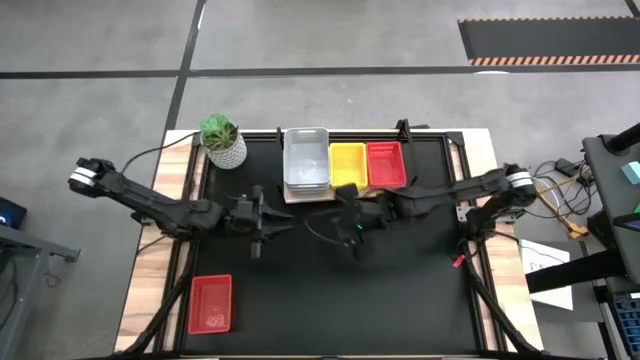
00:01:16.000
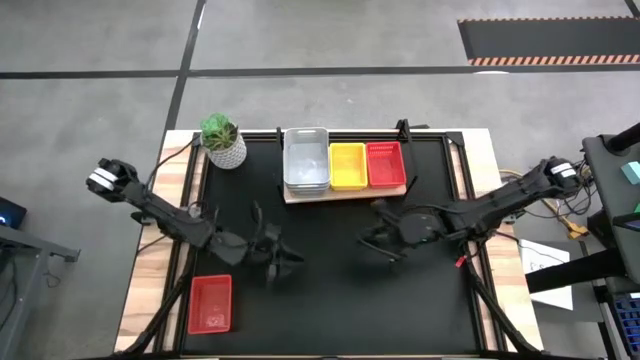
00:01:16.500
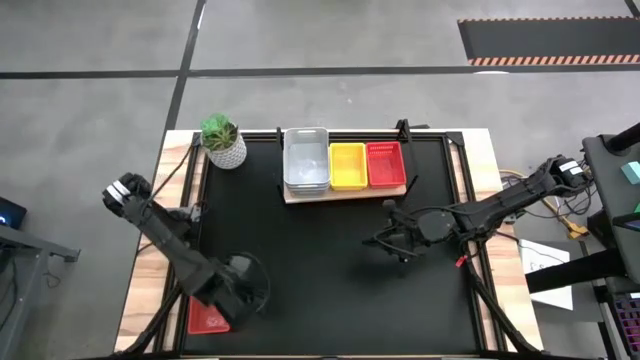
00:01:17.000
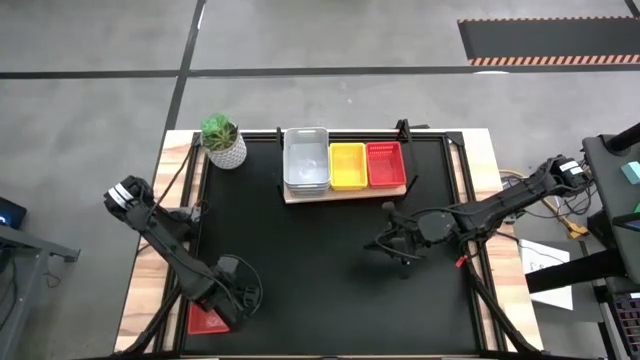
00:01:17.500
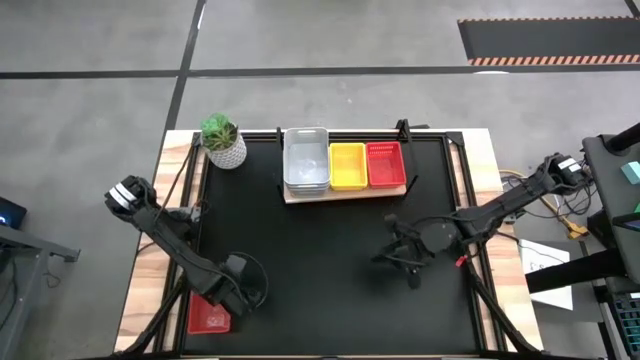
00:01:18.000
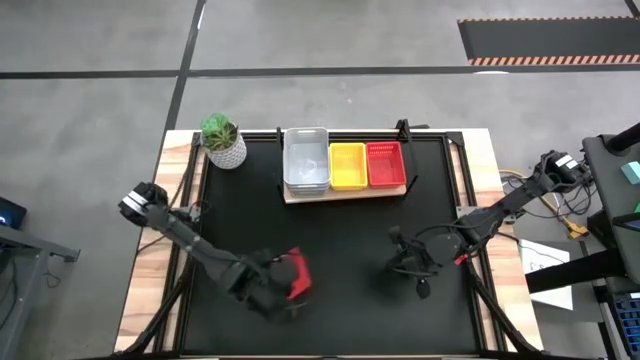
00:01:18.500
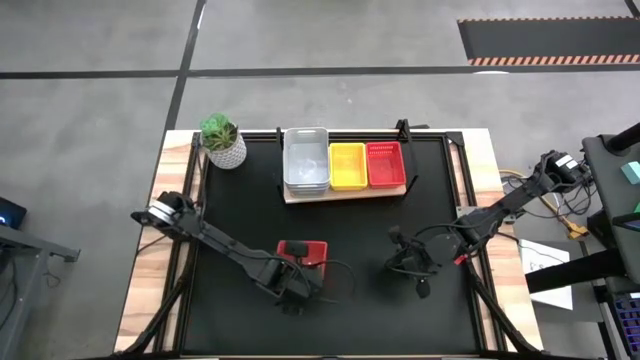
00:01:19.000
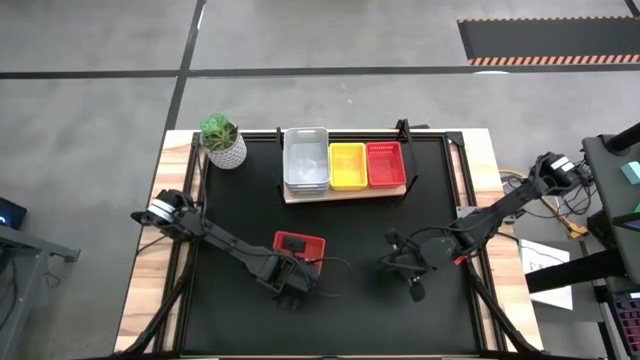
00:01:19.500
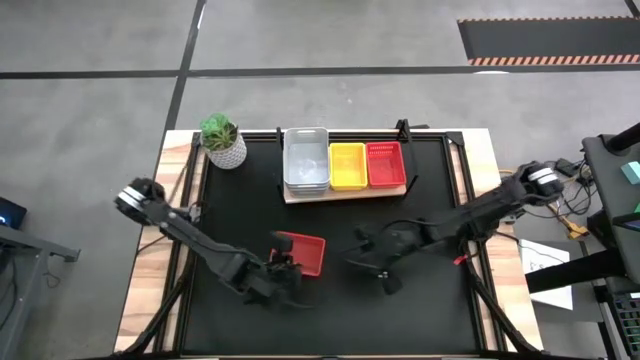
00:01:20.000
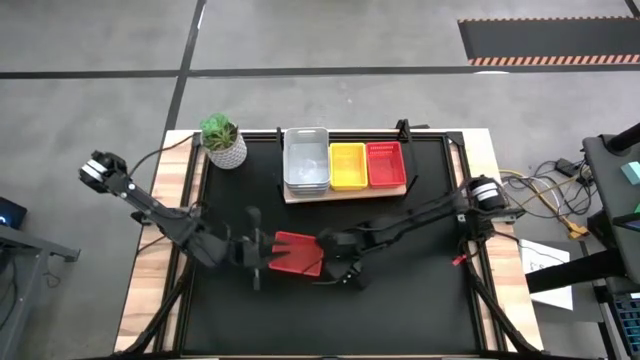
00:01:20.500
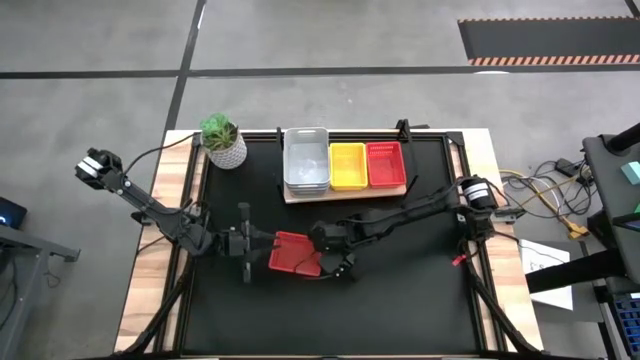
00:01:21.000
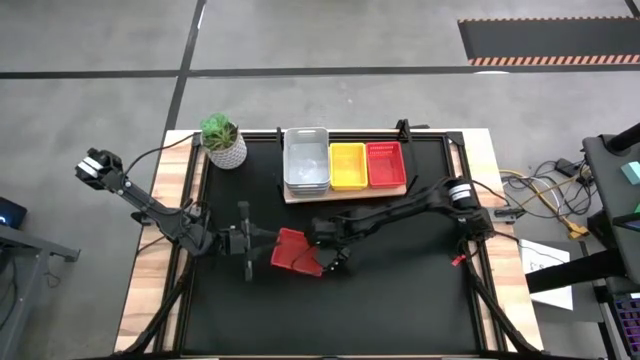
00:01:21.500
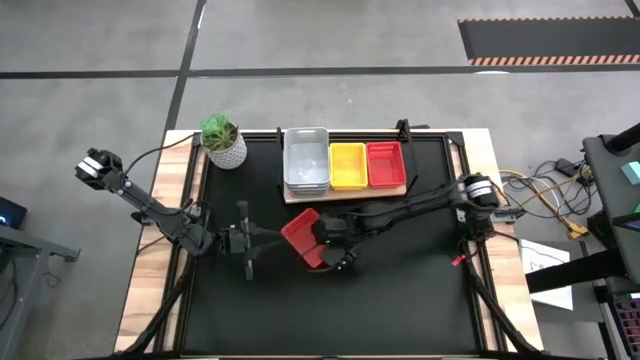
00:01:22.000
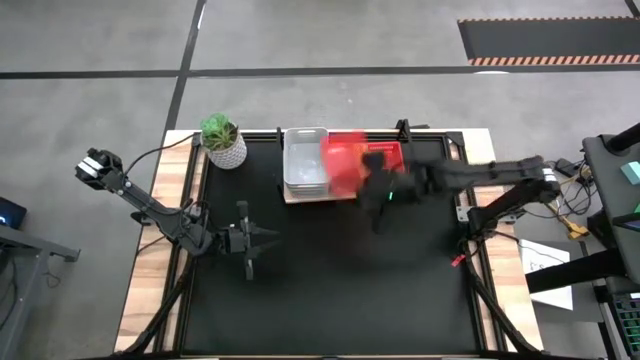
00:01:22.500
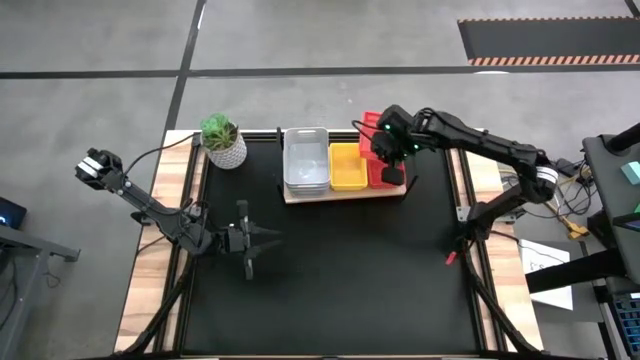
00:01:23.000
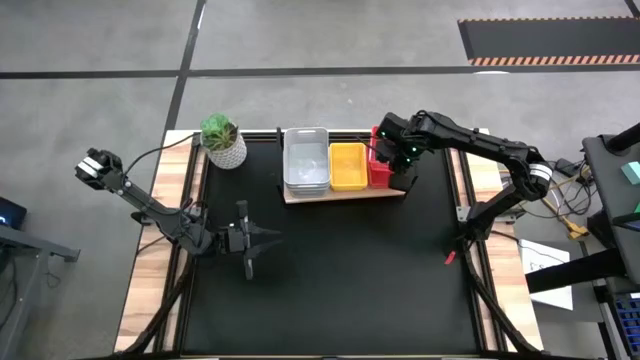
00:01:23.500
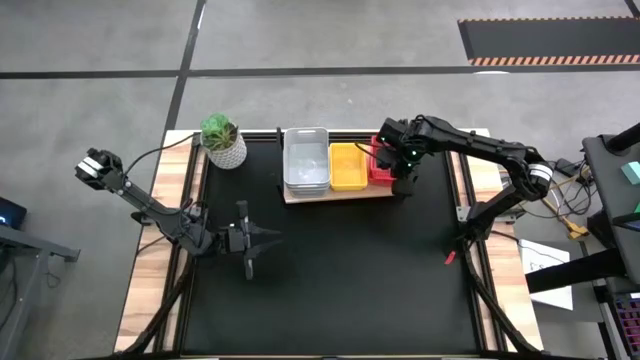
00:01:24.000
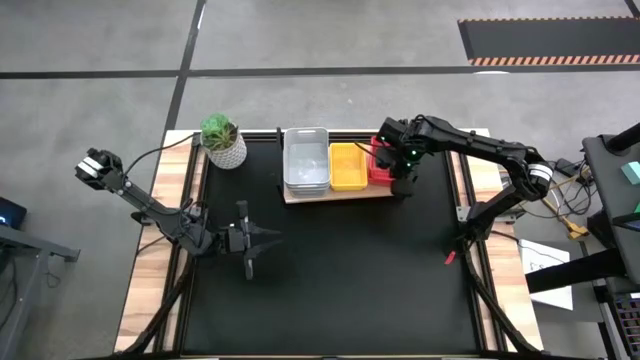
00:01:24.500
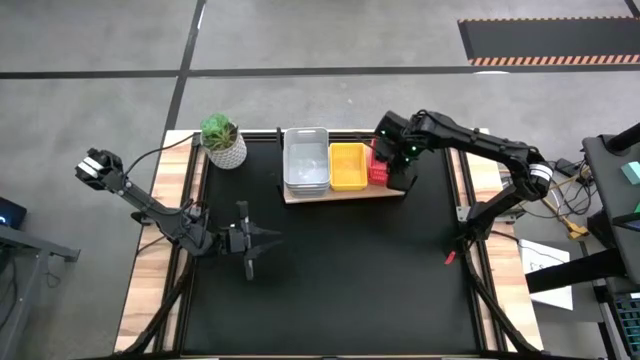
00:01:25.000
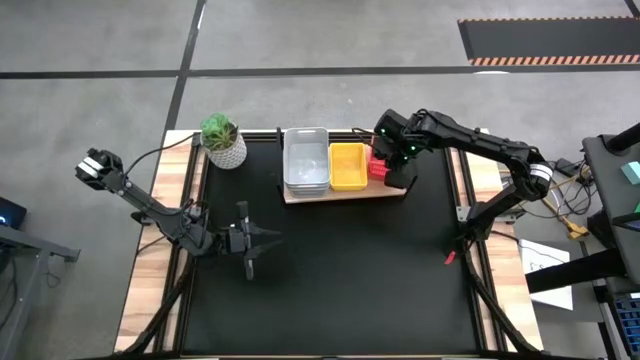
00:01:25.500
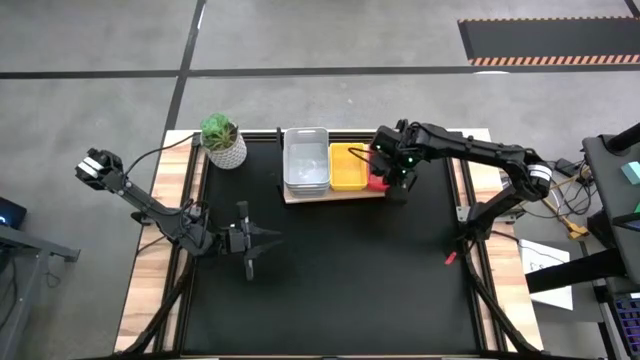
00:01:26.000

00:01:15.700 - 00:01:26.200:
Task: Stack baskets on shelf by color
Stack the red bin on top of the red bin on the shelf

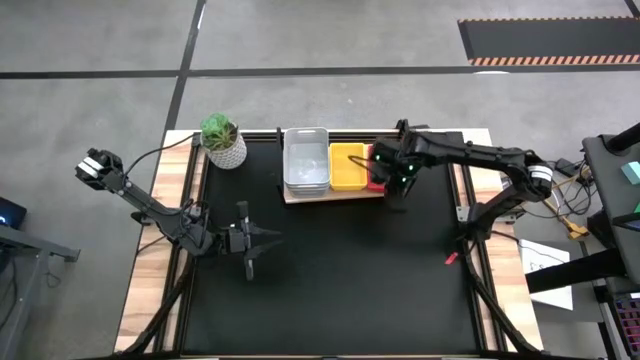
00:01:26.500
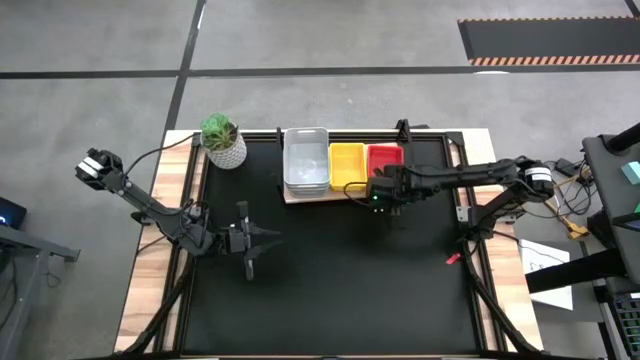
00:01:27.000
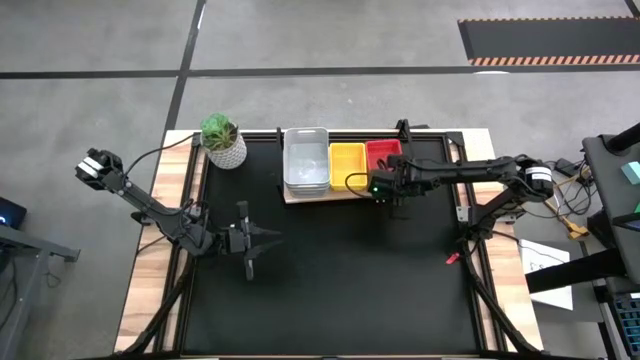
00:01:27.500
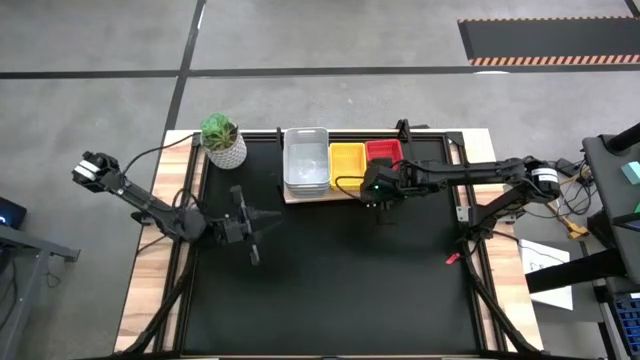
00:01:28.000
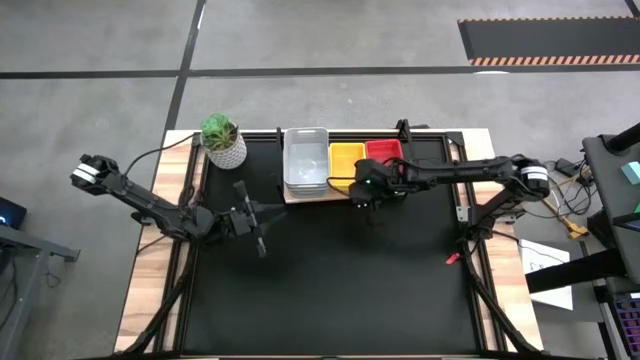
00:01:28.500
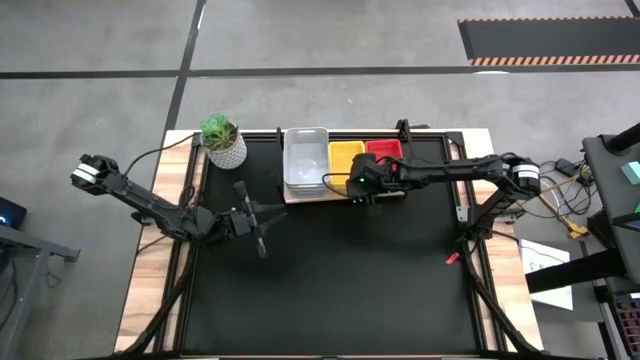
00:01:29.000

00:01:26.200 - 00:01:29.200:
Adjust the bins on the shelf

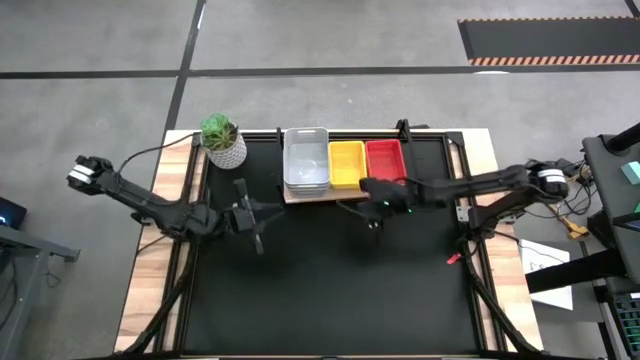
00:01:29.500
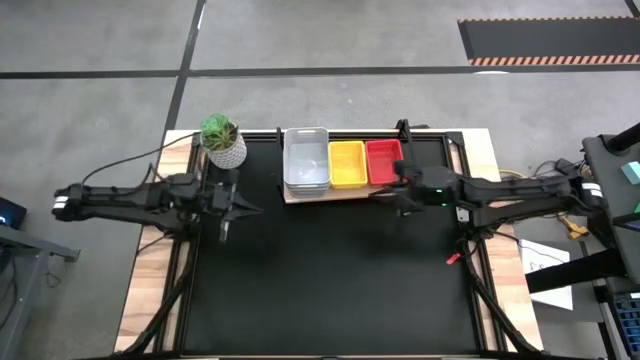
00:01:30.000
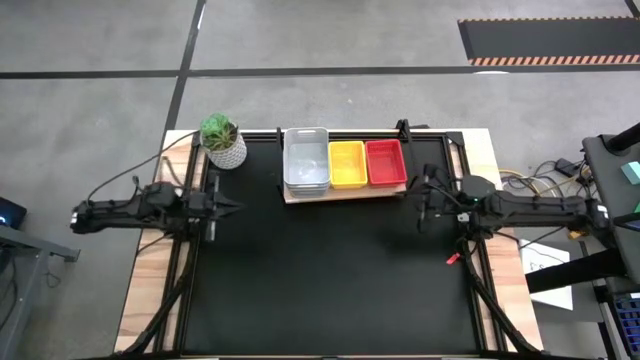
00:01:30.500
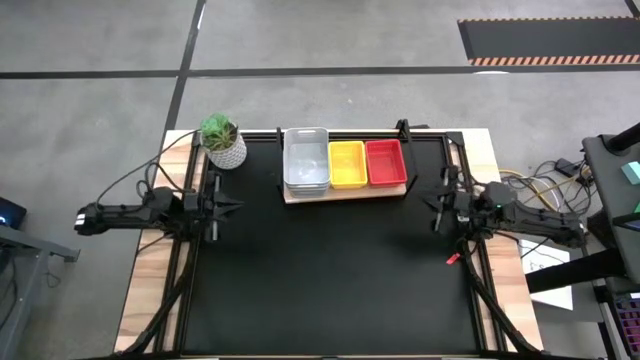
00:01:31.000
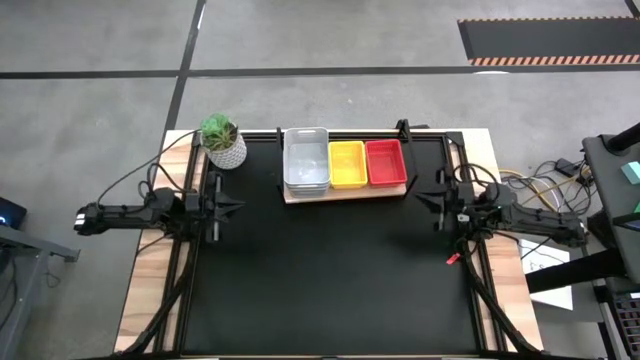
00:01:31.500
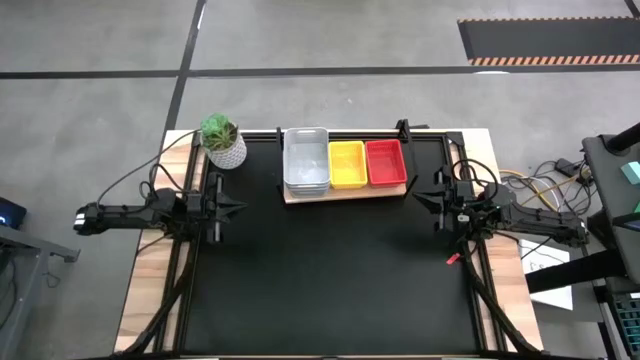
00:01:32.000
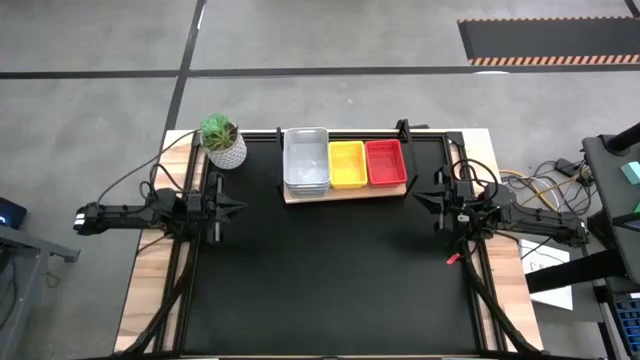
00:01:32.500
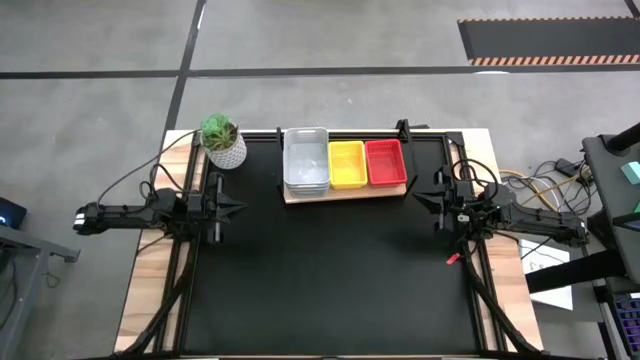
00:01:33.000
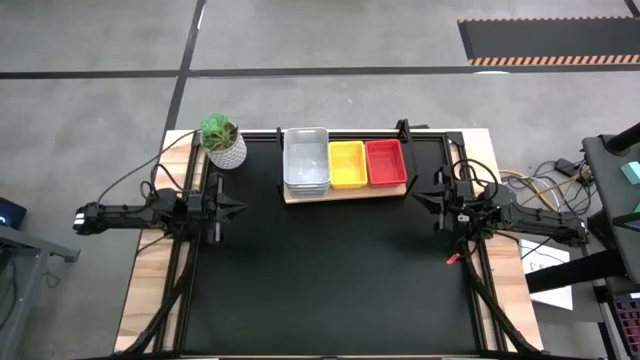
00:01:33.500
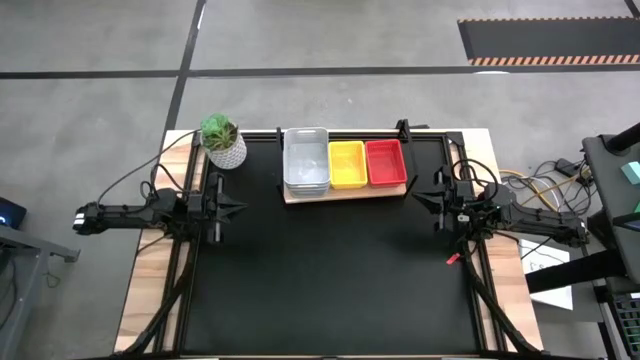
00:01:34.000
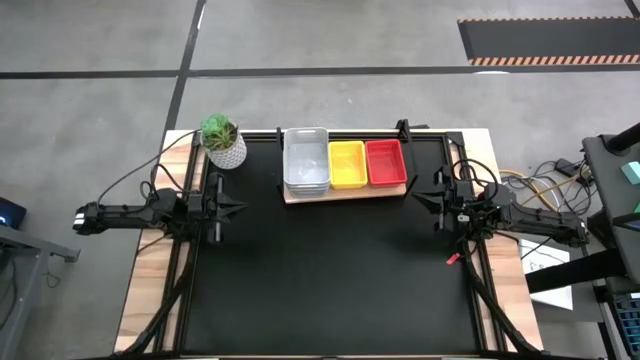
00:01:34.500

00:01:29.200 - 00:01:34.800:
Return to Home Position

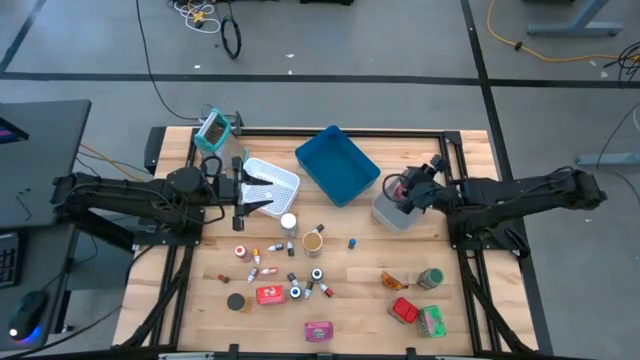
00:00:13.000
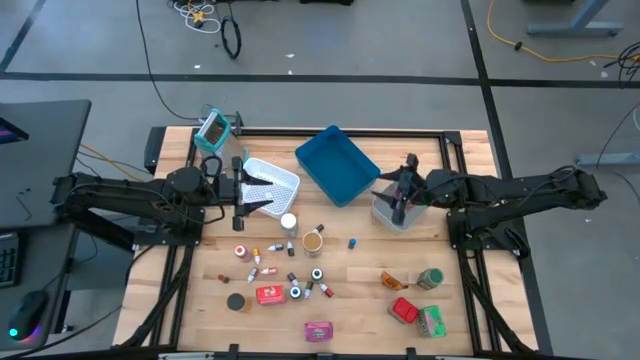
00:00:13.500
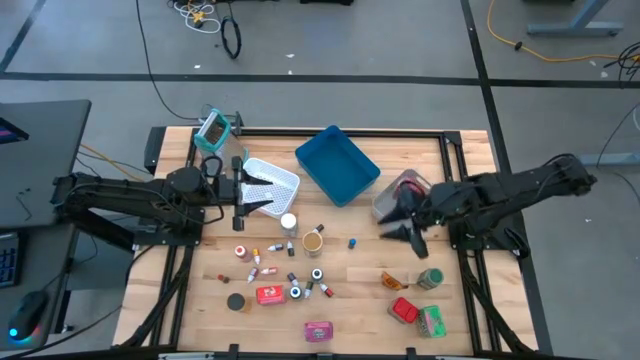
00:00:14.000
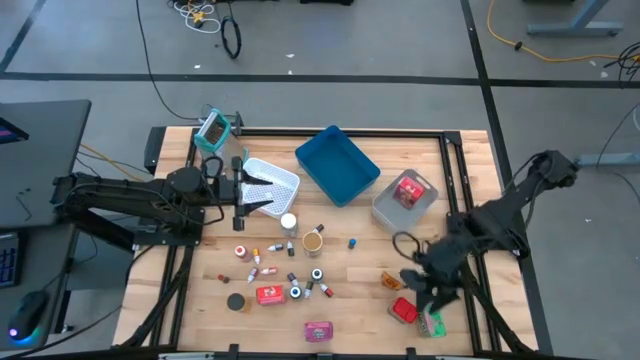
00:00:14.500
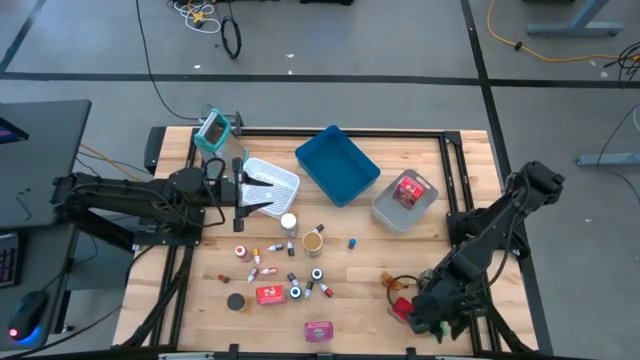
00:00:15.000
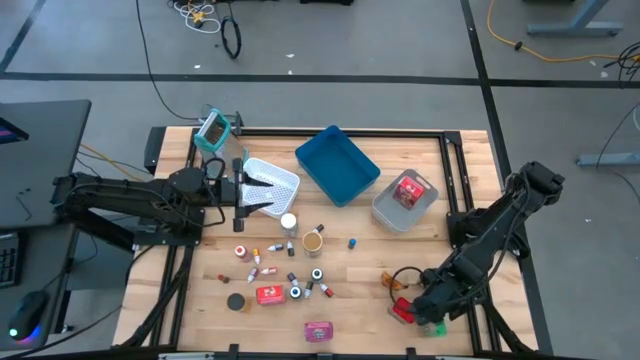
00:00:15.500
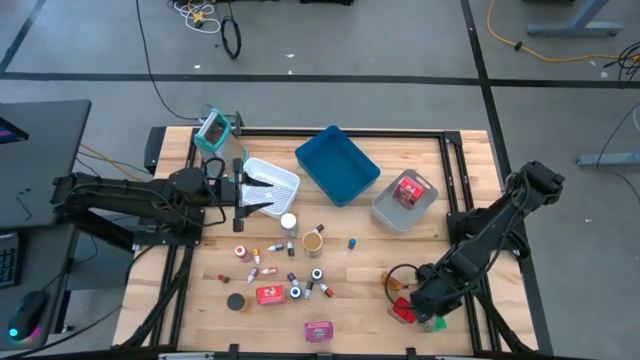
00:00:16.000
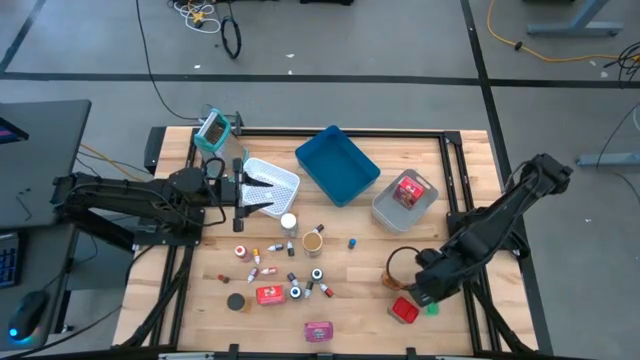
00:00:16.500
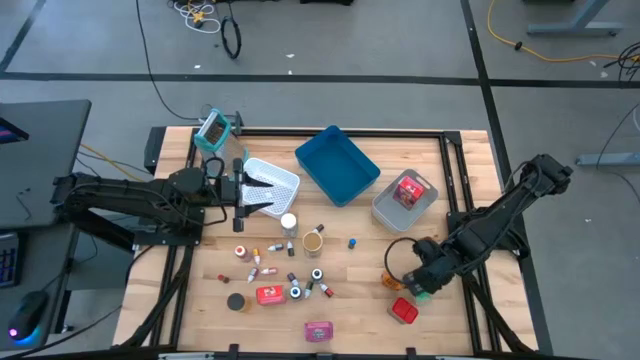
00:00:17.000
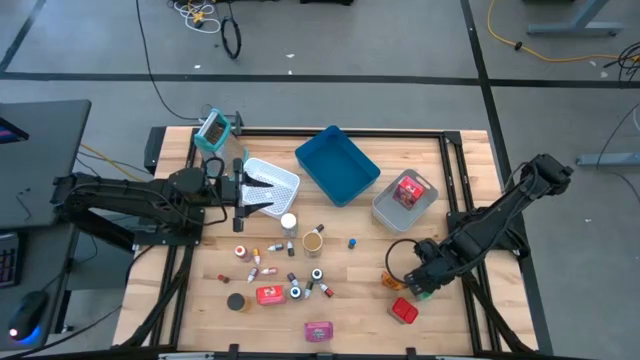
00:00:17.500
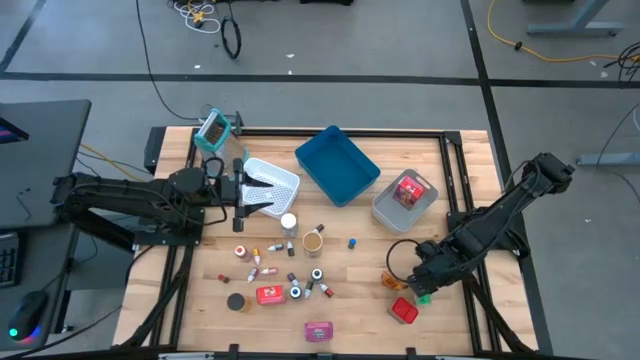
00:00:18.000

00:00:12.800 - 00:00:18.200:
Task: Pick & Place Kitchen Items
Put the green cereal box into the gray bin
